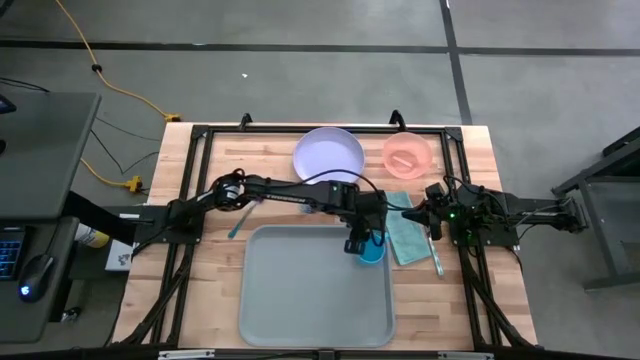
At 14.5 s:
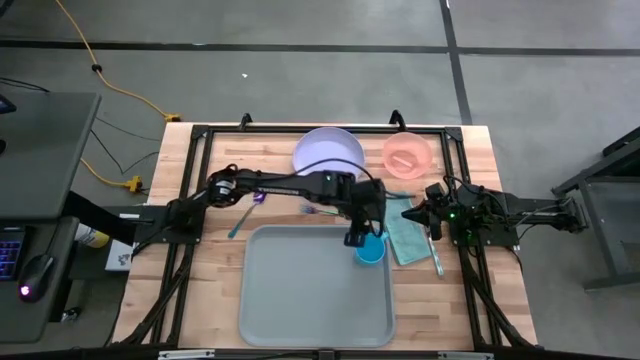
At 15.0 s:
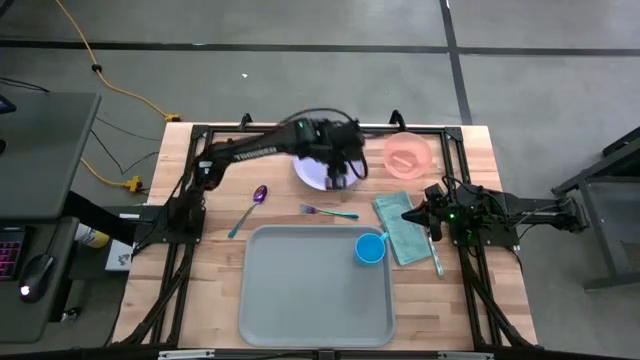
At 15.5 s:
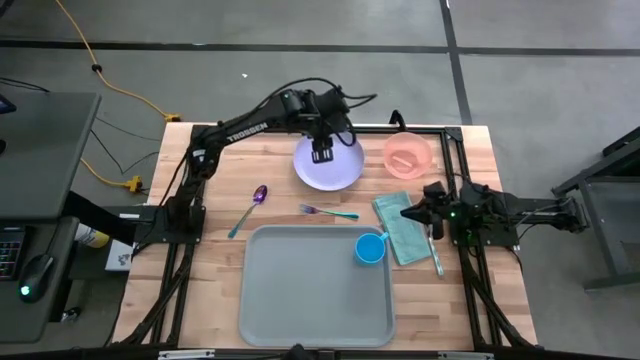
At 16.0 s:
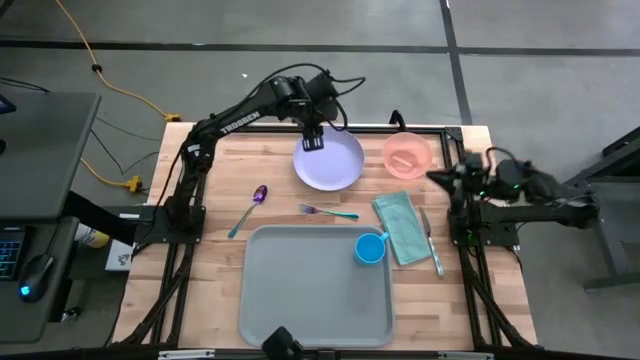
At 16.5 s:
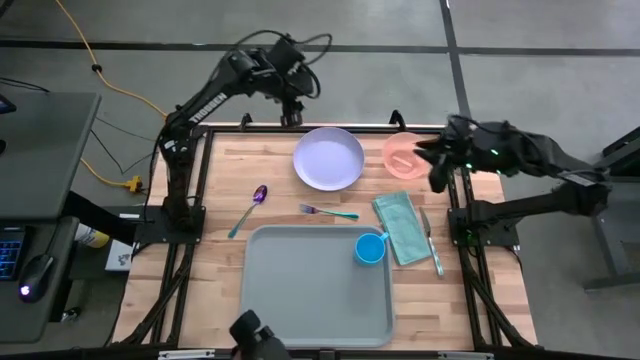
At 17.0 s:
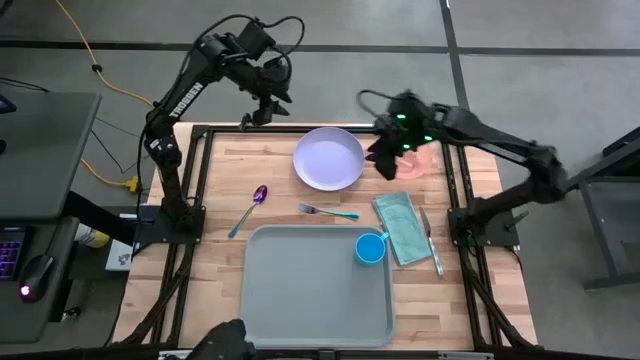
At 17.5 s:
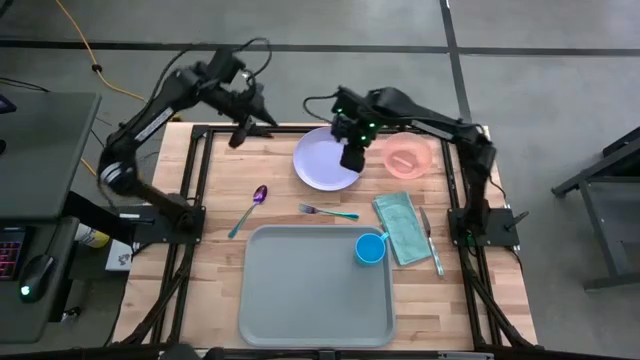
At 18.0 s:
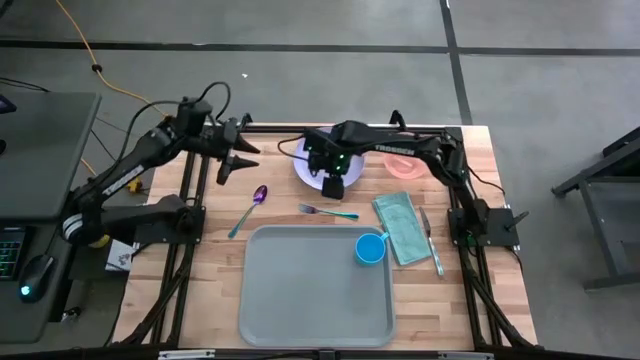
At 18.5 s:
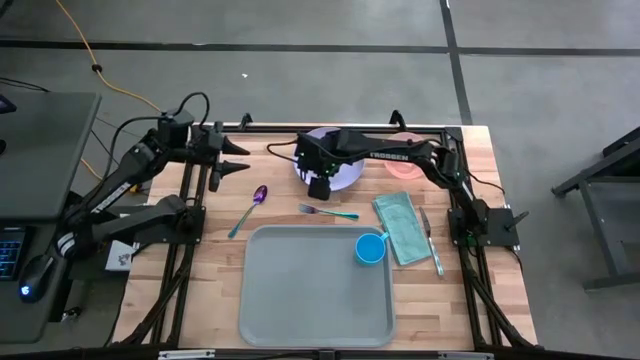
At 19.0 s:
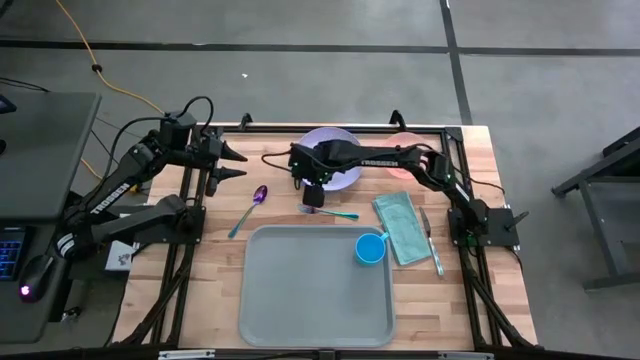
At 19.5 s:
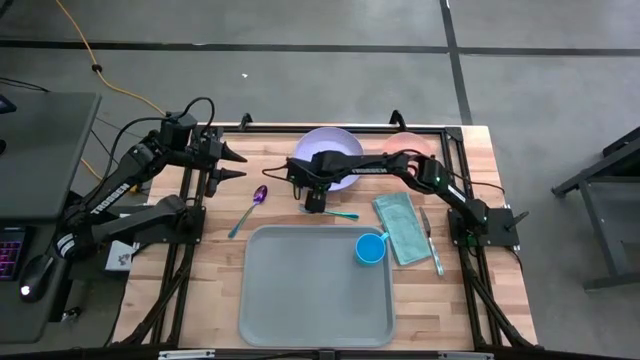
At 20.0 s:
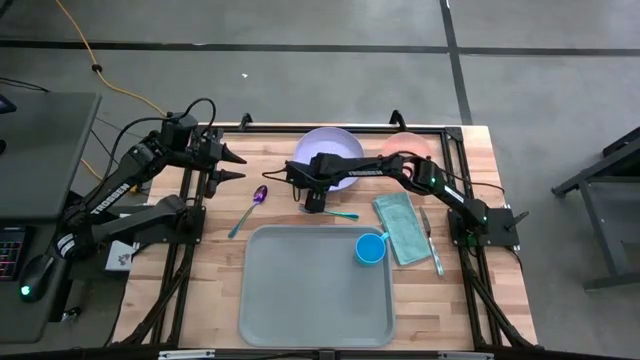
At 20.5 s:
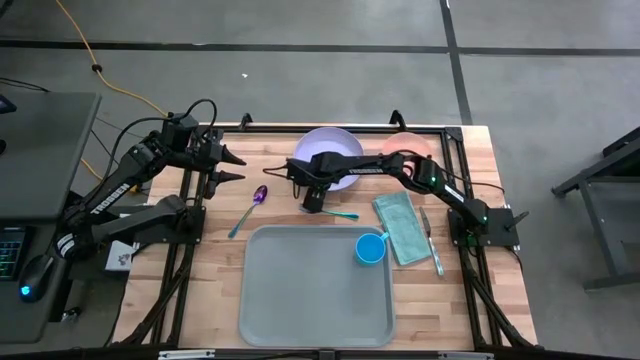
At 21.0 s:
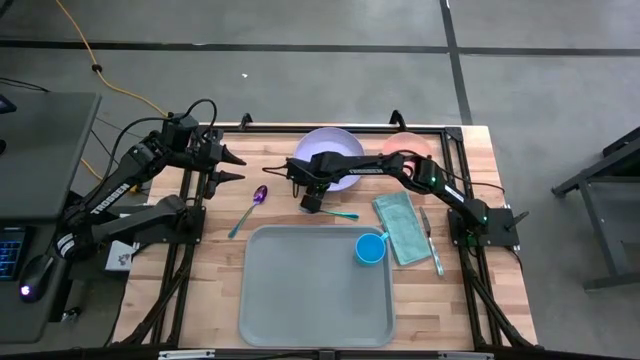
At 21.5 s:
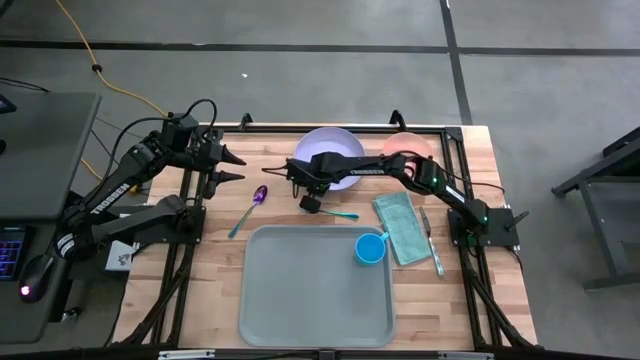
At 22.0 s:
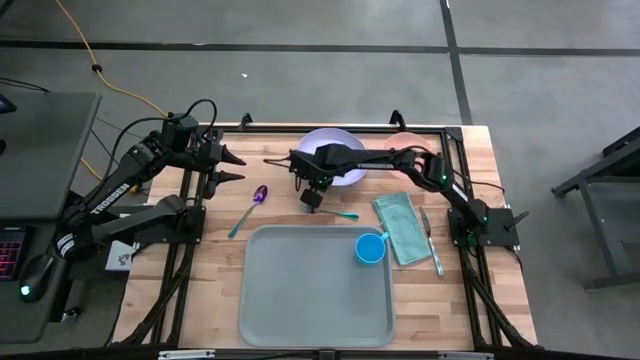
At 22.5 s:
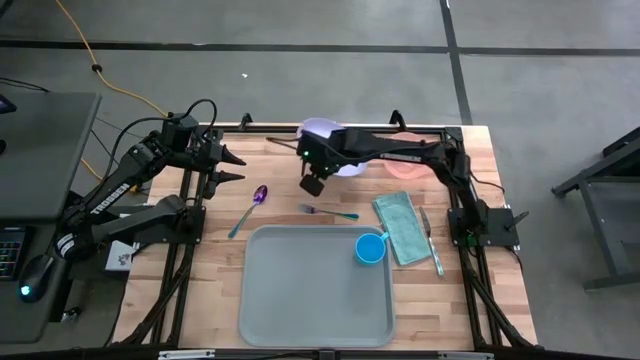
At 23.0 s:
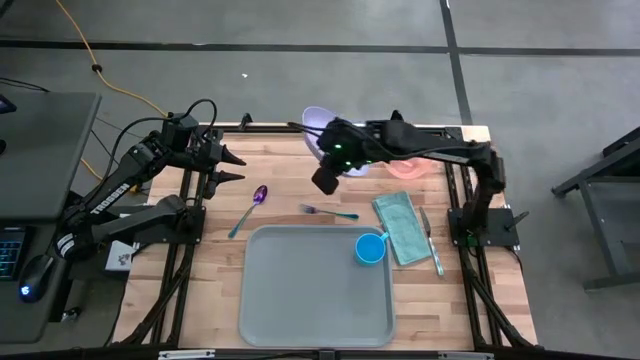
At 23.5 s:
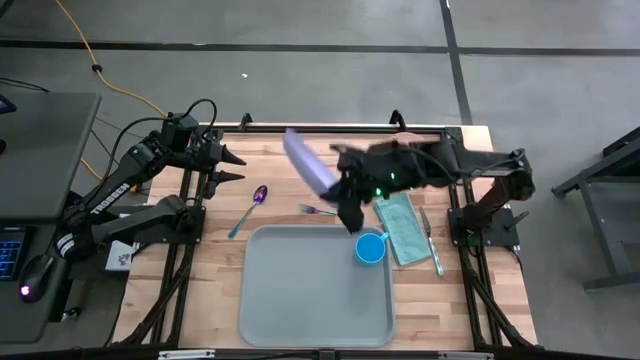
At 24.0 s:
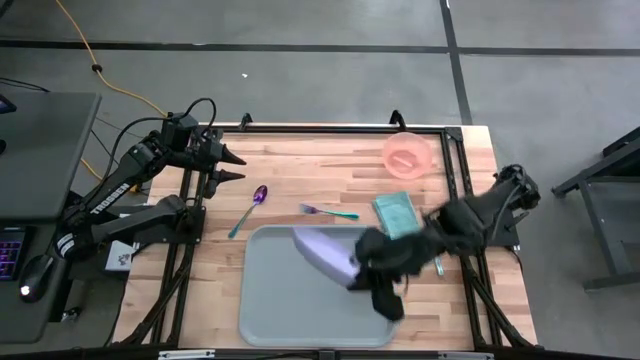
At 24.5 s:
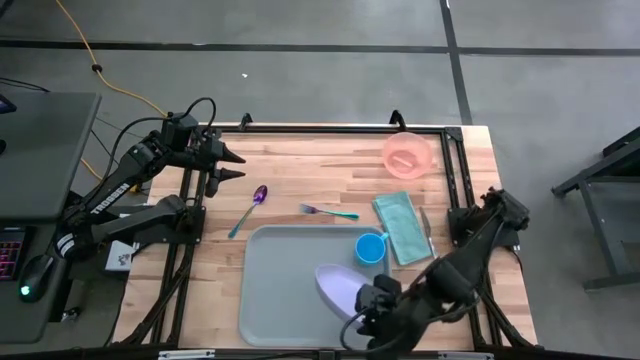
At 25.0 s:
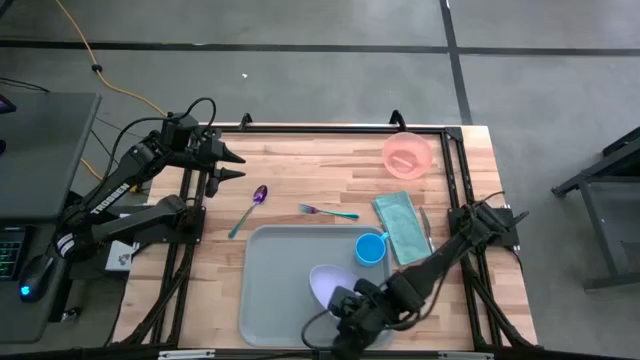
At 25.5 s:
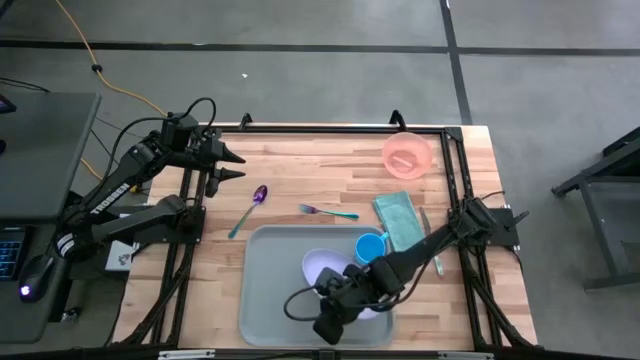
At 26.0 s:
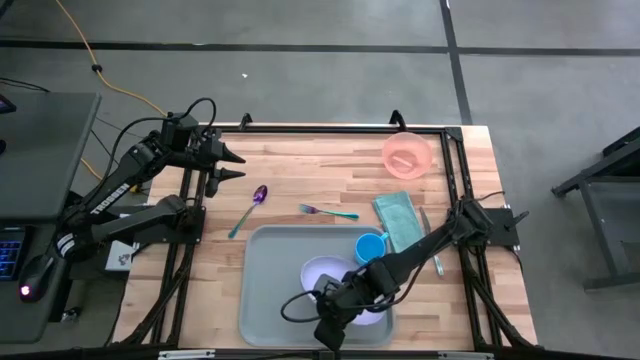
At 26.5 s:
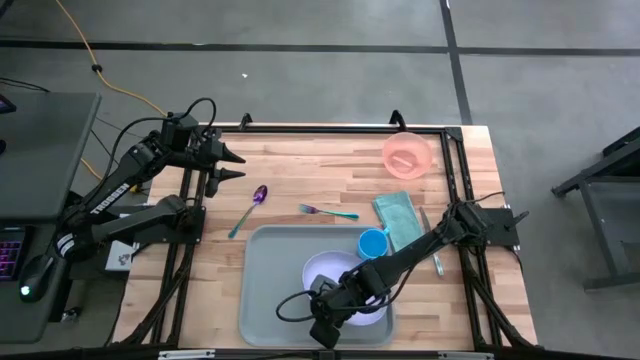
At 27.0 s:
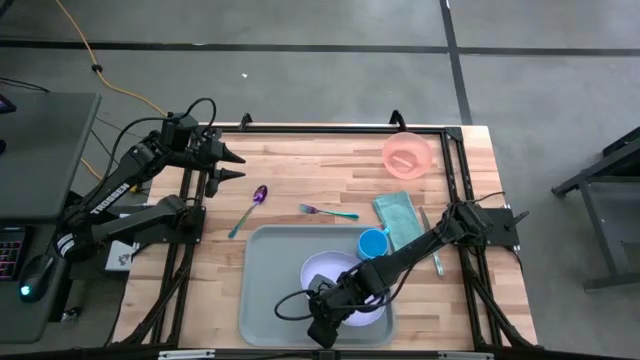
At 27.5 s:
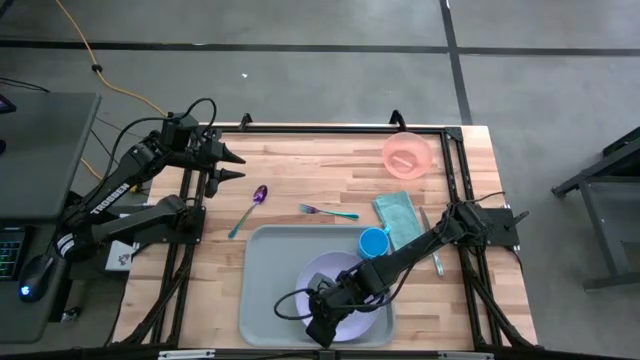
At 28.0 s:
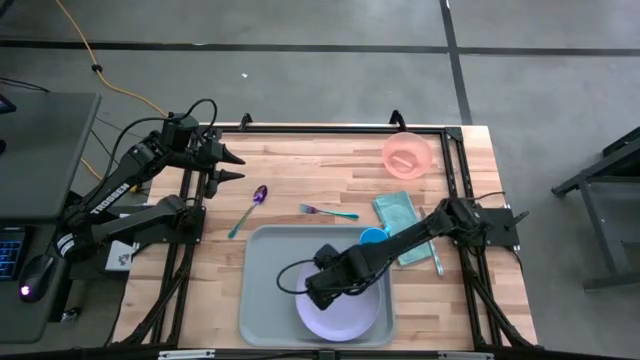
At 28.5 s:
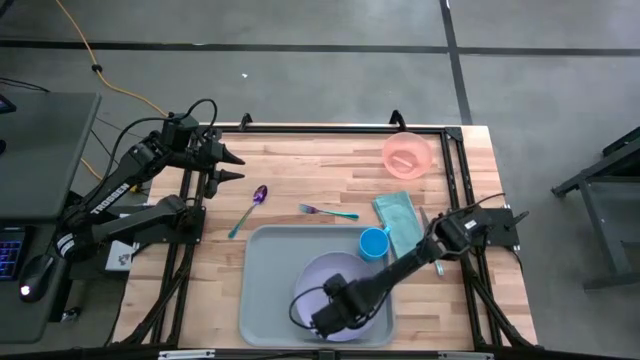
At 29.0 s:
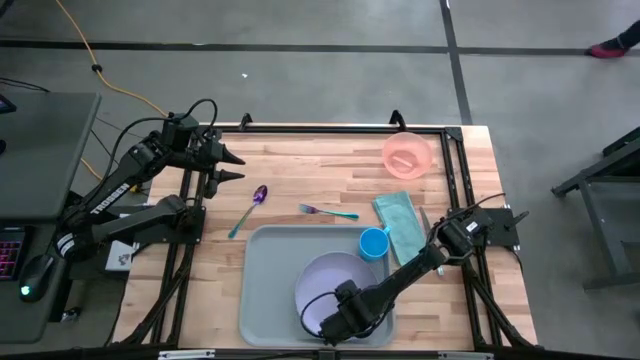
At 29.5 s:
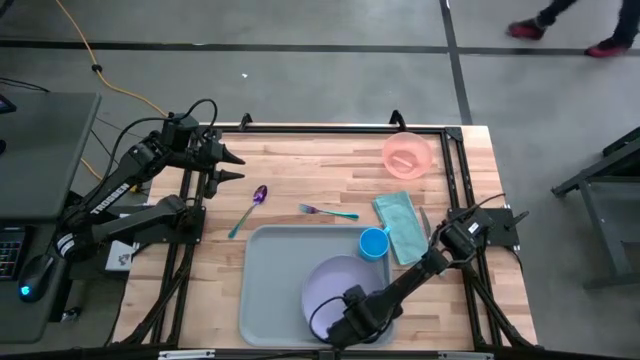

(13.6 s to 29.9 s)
Task: Set up tray
Put the violet plate on the gray serving tray to the bottom left of the blue mug
